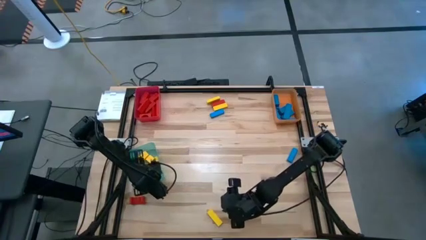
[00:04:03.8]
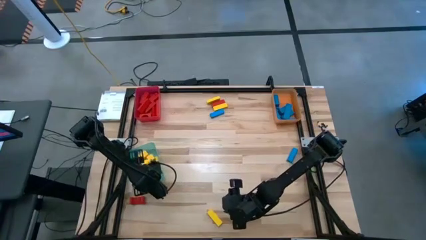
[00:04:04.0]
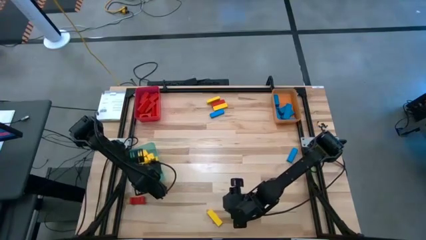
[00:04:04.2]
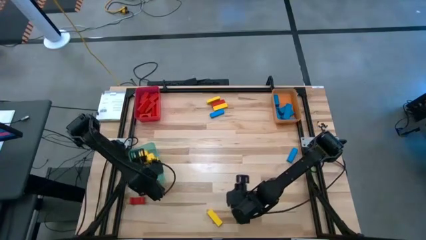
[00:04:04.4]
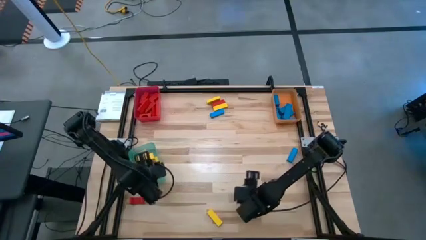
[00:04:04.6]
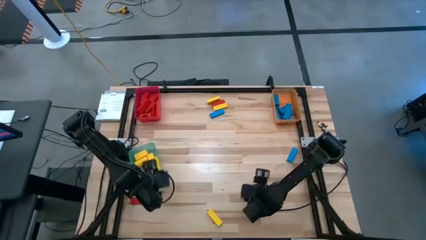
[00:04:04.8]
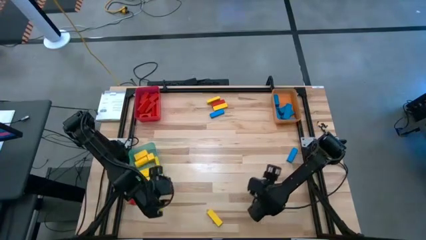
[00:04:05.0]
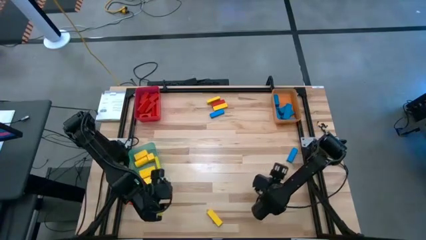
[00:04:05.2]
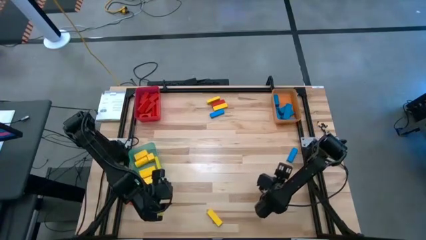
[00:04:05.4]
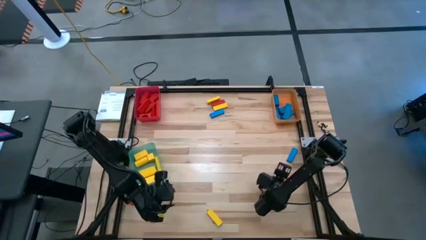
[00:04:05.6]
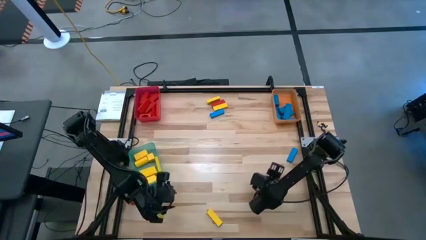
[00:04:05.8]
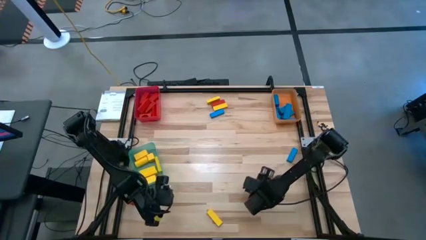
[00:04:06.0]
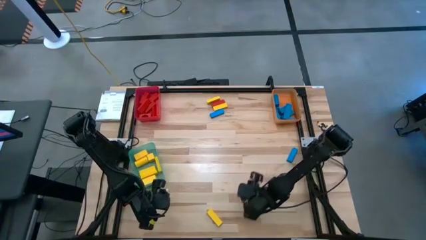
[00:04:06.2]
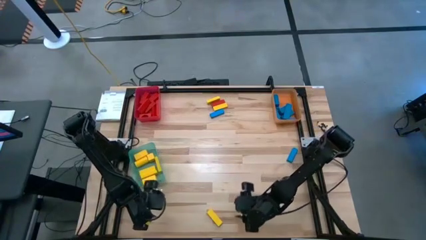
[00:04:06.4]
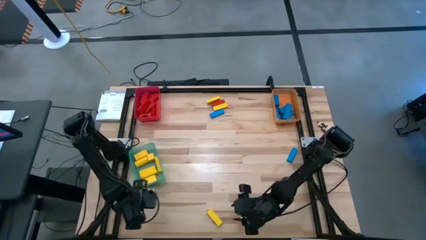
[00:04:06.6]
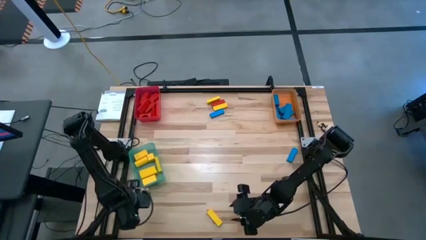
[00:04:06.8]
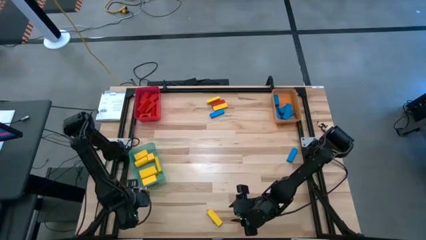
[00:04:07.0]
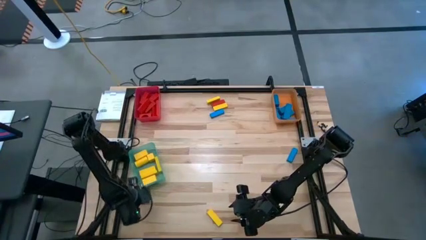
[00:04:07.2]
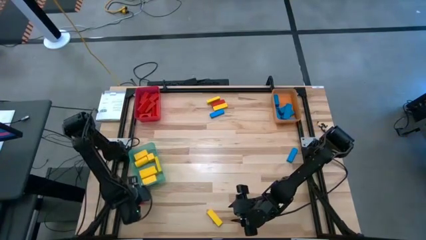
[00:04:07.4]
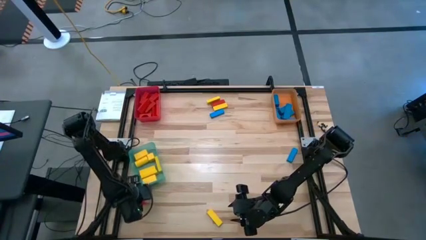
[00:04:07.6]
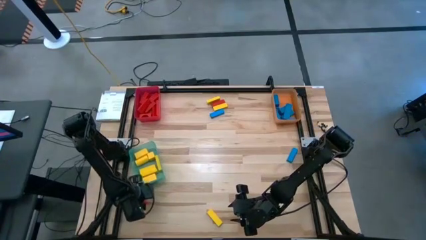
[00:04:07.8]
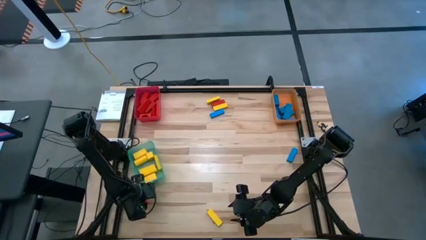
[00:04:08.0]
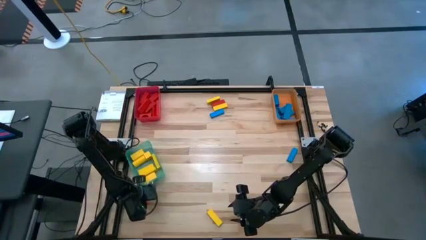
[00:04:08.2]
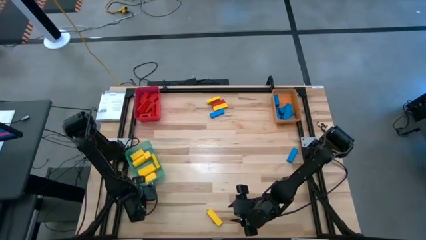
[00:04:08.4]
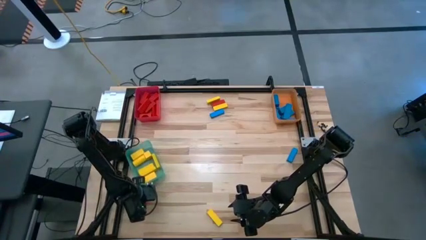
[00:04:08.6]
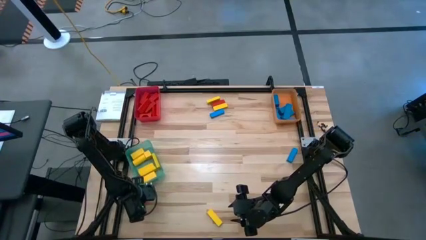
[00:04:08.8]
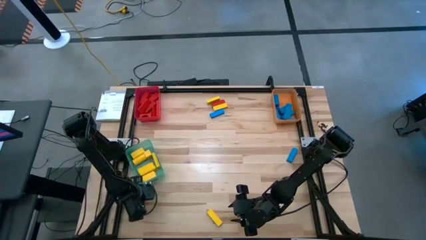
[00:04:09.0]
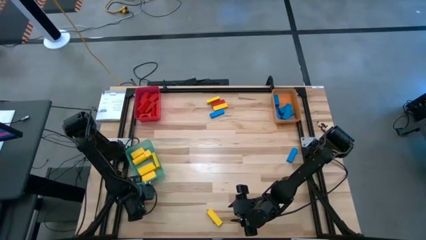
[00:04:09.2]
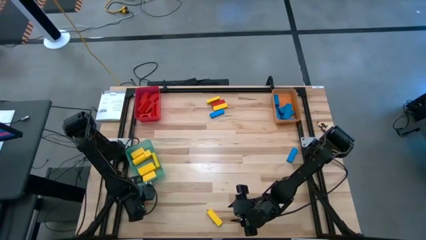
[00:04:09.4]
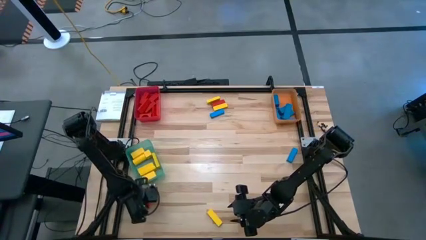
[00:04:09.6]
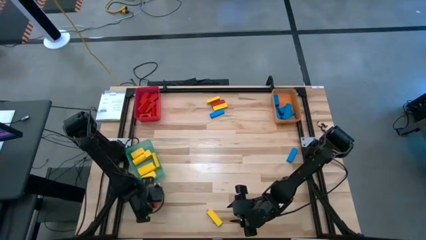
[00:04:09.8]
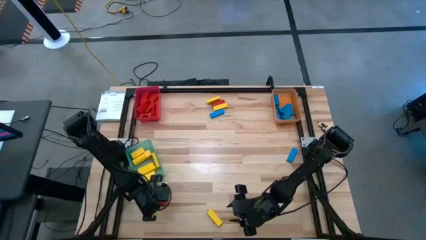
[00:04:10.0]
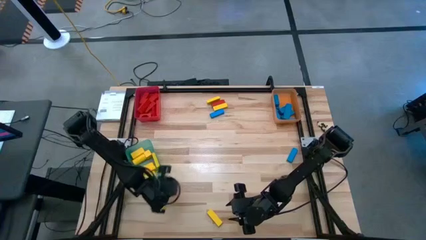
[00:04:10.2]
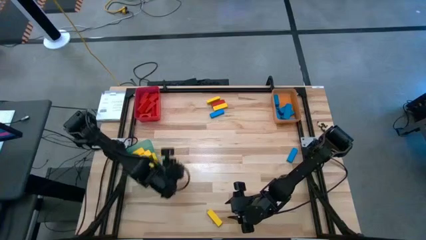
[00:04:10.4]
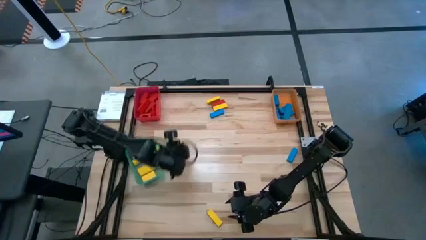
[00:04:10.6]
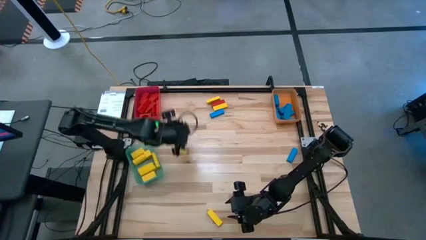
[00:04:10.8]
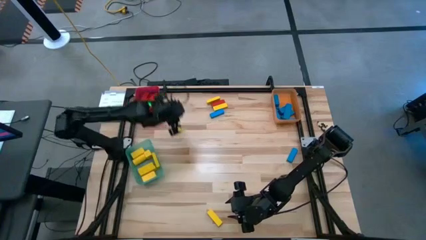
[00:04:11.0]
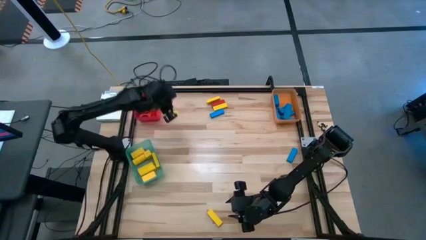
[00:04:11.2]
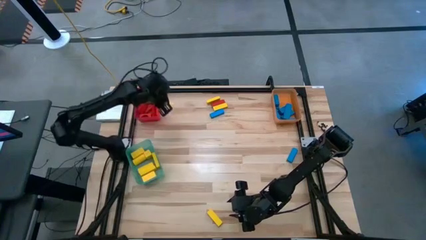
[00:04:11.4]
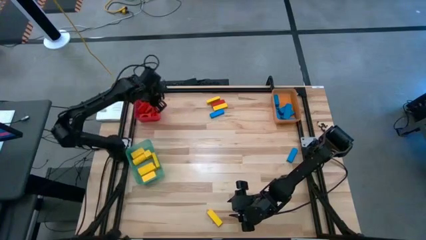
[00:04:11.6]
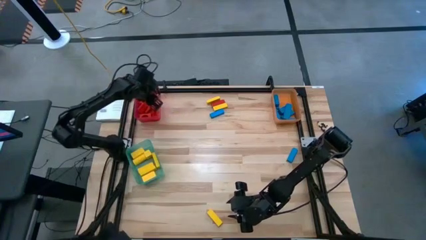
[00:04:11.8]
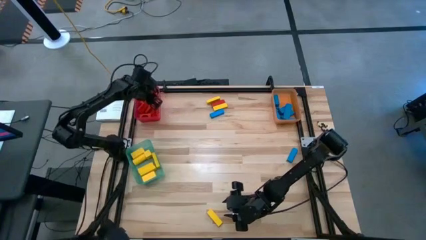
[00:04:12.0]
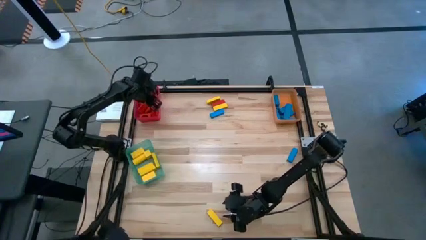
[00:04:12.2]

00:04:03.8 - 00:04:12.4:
Task: Sort blocks
Put the red block into the red bin

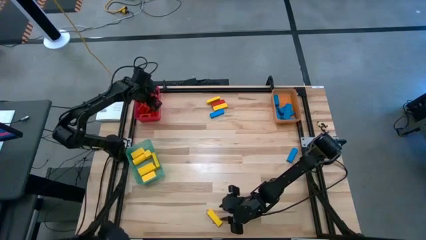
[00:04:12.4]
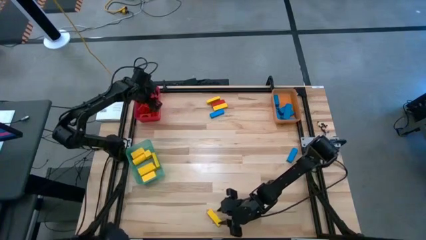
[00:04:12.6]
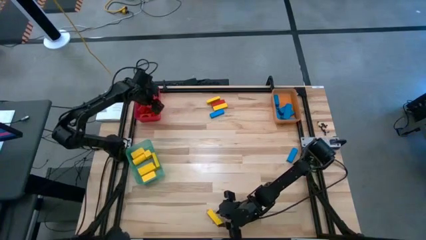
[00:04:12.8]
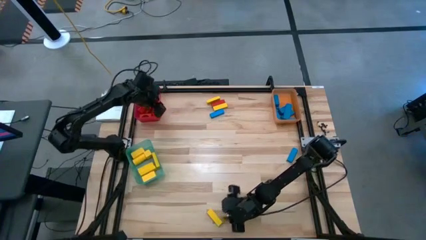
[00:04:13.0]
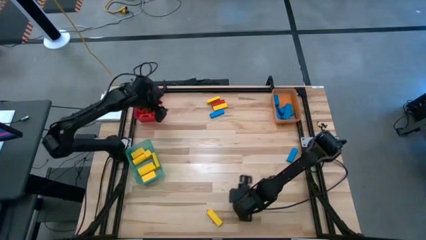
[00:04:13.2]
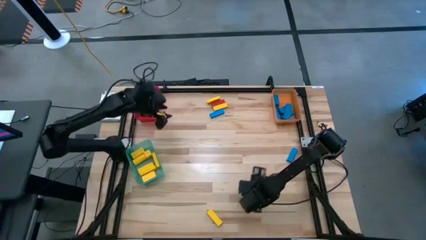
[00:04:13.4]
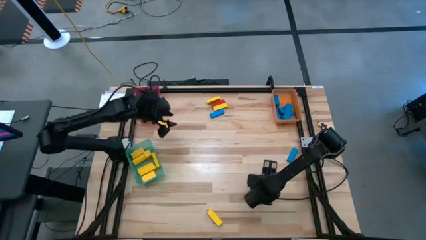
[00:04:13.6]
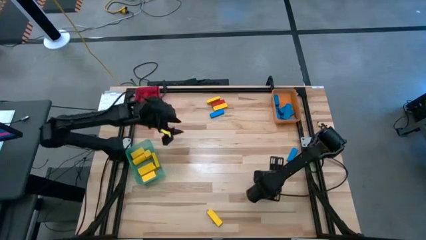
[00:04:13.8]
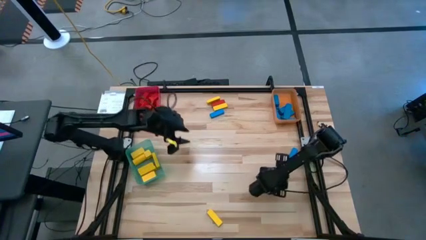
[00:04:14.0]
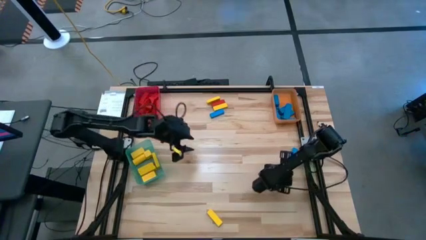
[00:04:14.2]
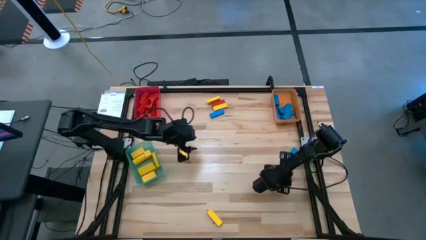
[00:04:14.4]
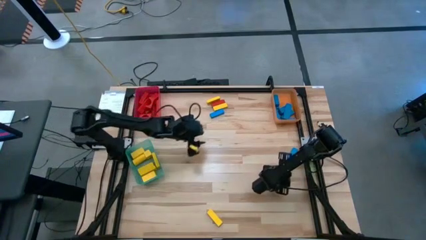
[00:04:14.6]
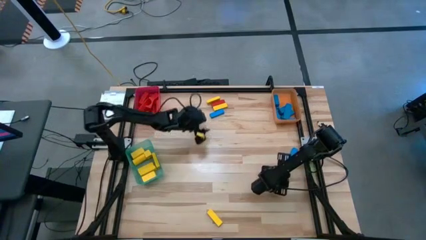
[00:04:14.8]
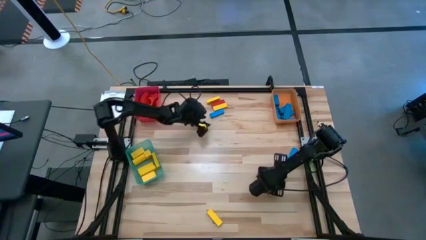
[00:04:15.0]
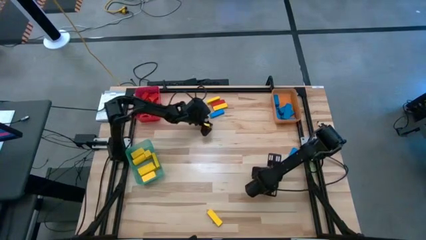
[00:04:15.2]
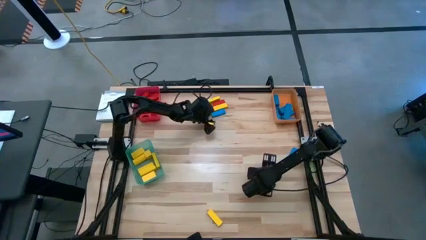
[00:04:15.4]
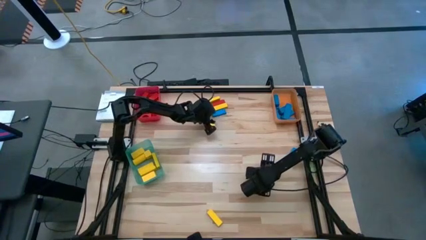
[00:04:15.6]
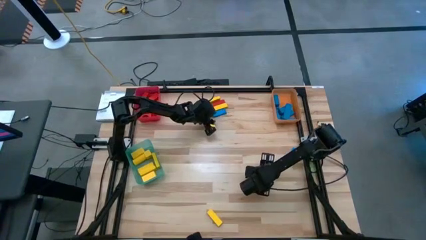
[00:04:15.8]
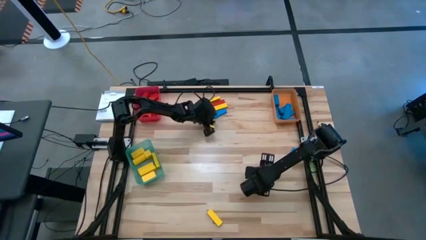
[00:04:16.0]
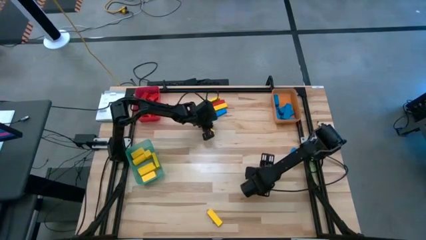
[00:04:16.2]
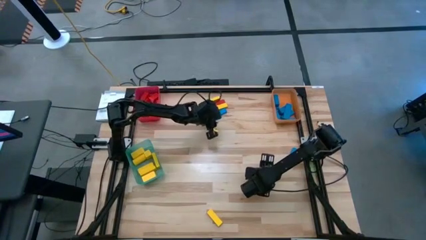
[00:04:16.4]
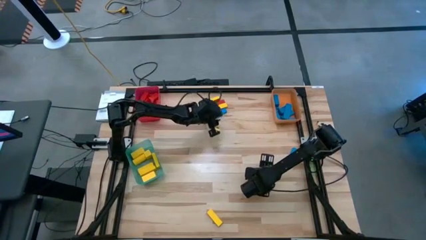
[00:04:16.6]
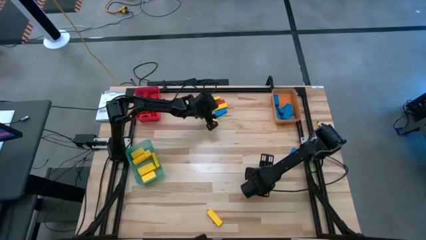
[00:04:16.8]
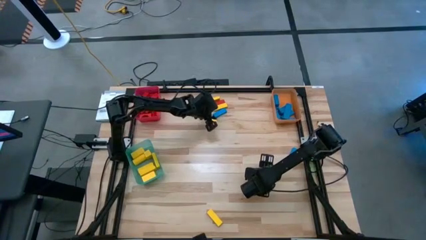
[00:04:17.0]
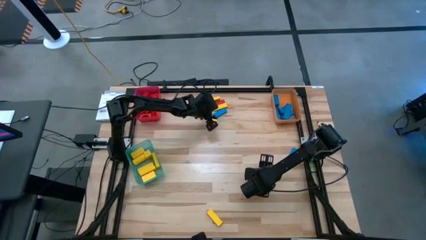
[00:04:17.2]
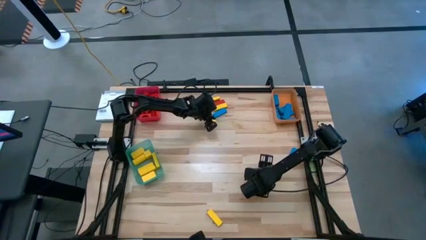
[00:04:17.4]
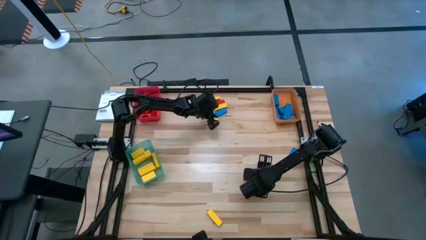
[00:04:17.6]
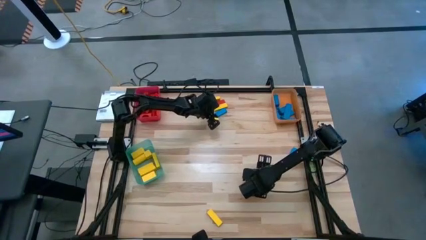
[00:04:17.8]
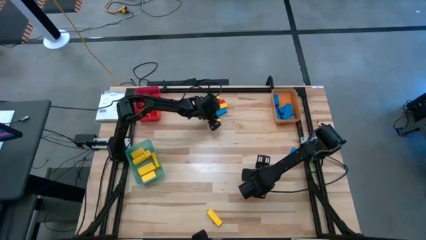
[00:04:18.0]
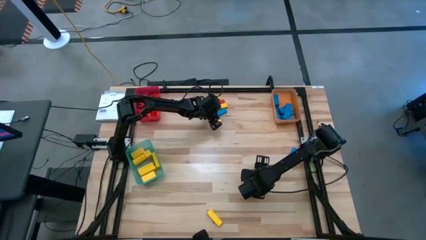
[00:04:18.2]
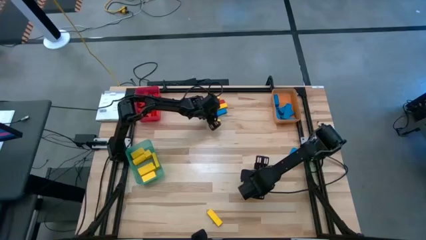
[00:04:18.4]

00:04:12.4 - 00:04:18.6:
Put the blue block into the orange bin
